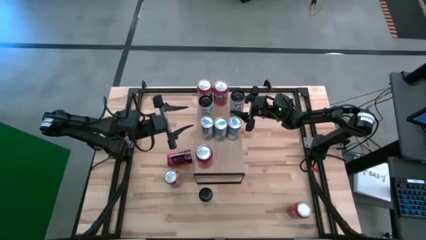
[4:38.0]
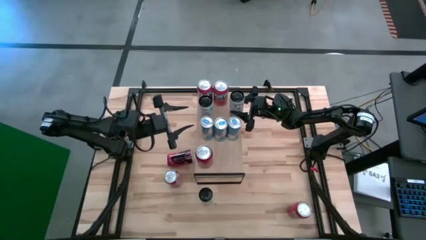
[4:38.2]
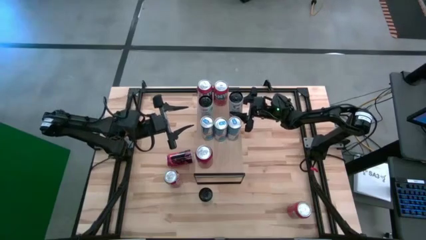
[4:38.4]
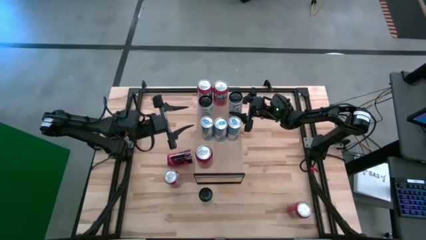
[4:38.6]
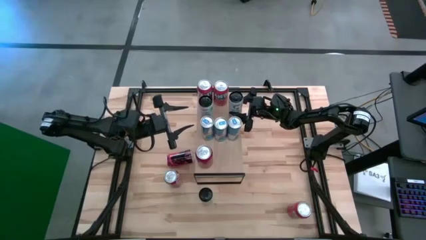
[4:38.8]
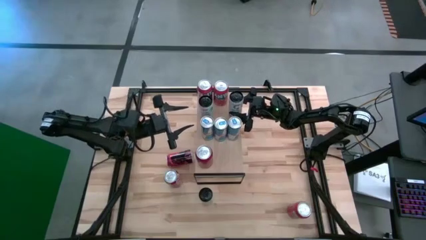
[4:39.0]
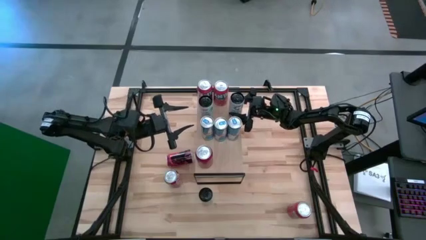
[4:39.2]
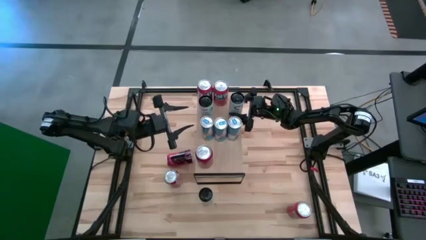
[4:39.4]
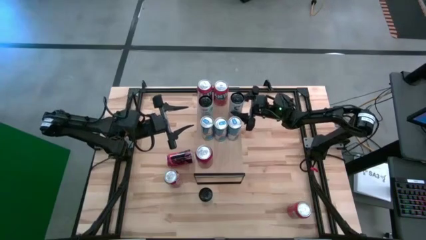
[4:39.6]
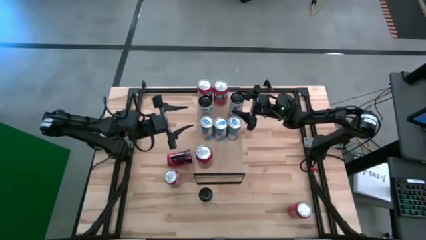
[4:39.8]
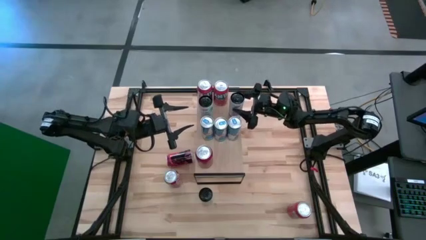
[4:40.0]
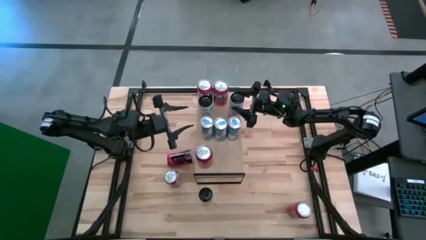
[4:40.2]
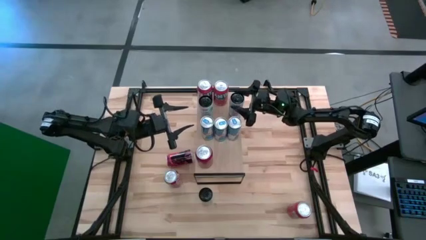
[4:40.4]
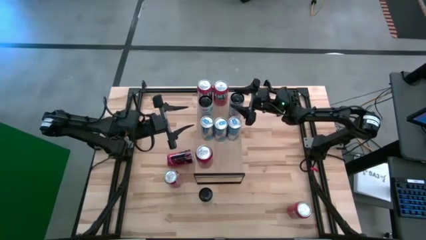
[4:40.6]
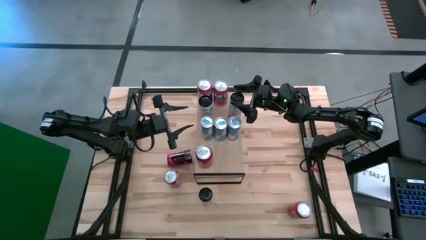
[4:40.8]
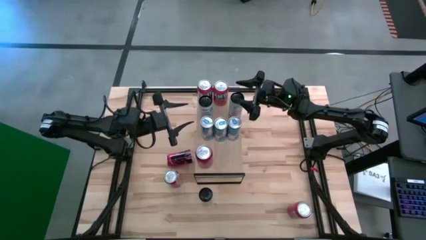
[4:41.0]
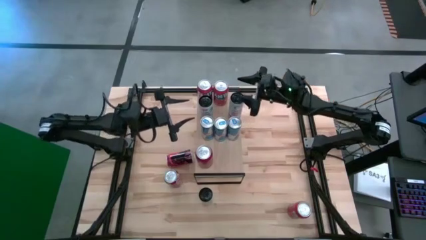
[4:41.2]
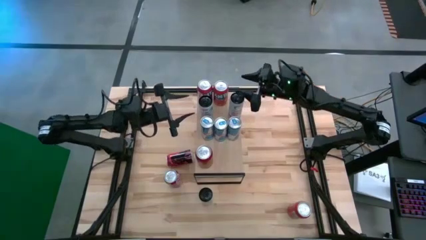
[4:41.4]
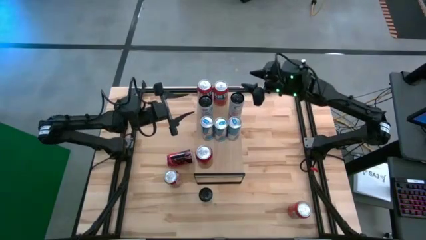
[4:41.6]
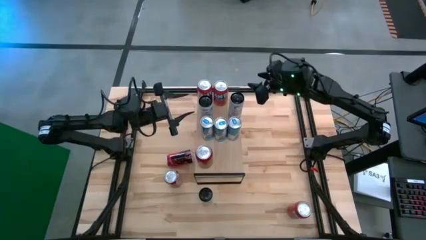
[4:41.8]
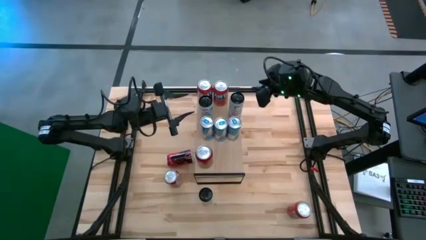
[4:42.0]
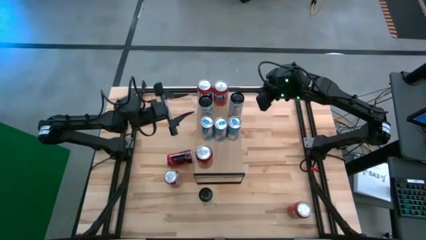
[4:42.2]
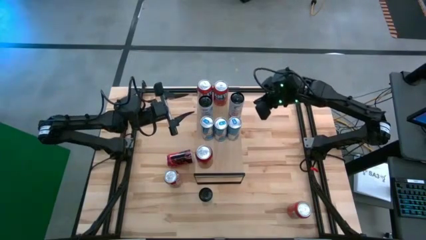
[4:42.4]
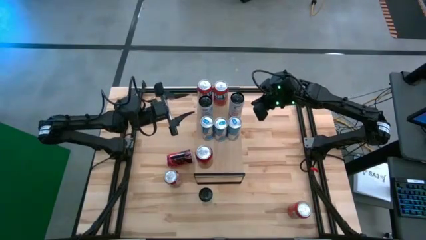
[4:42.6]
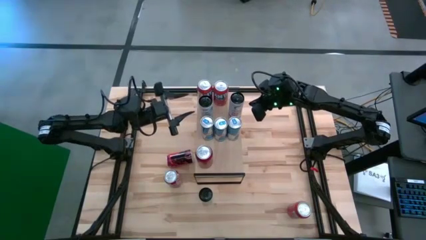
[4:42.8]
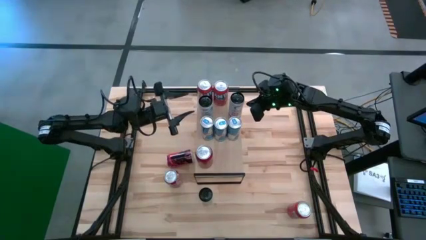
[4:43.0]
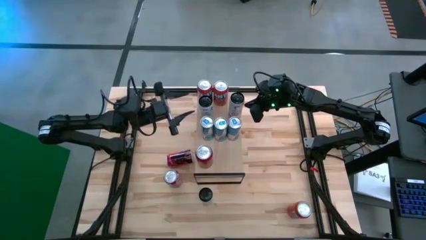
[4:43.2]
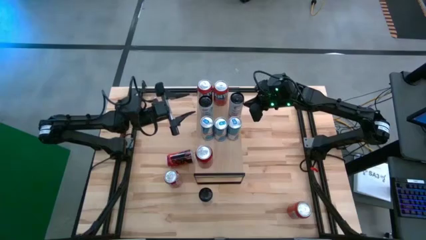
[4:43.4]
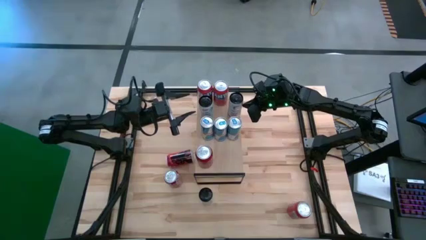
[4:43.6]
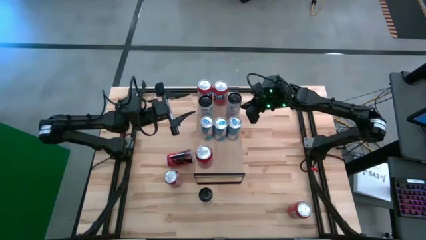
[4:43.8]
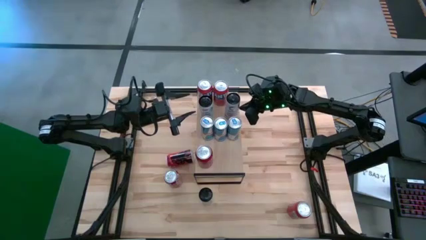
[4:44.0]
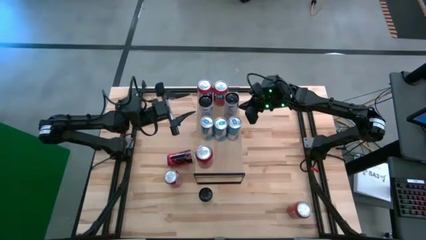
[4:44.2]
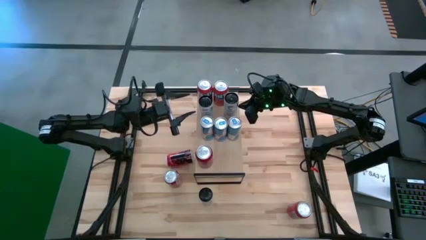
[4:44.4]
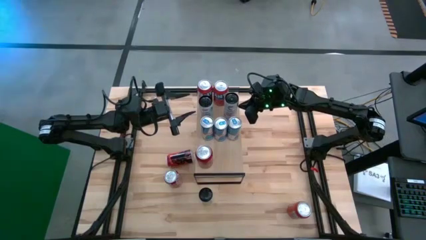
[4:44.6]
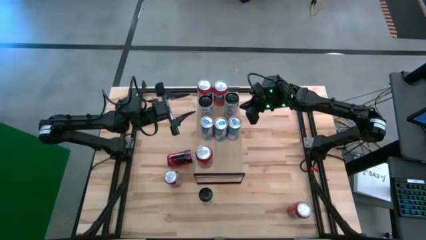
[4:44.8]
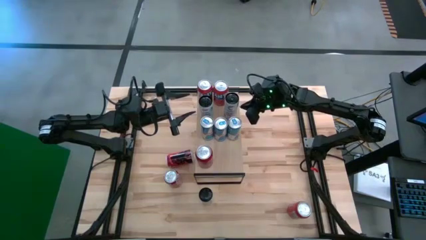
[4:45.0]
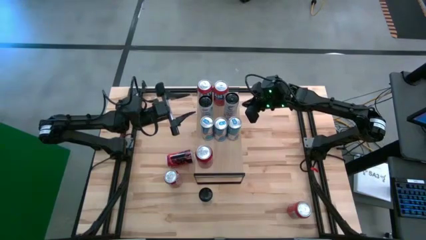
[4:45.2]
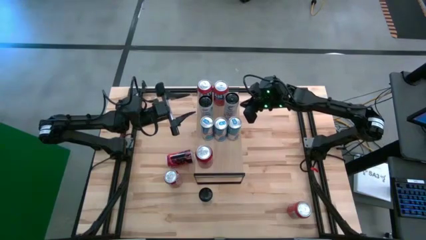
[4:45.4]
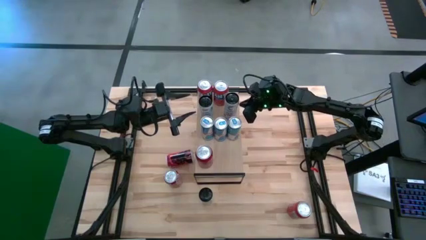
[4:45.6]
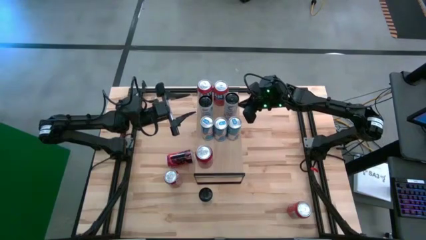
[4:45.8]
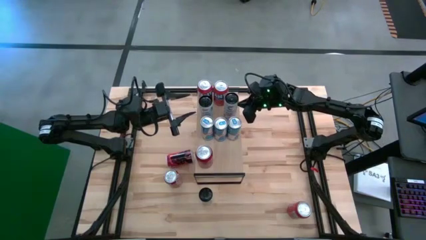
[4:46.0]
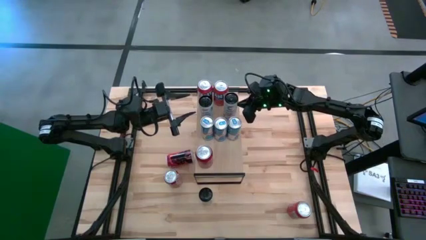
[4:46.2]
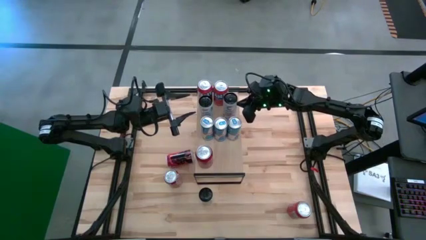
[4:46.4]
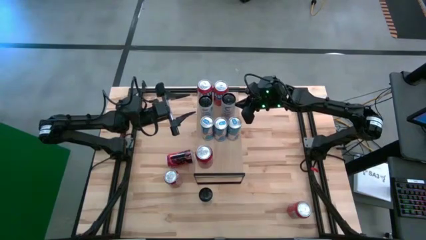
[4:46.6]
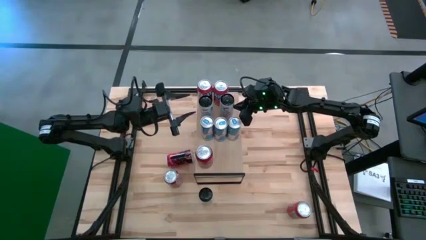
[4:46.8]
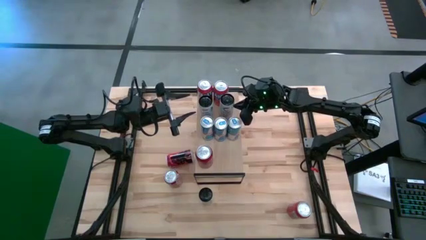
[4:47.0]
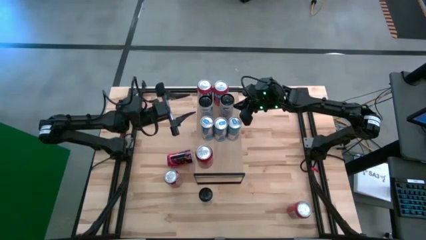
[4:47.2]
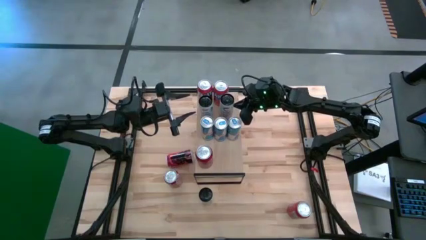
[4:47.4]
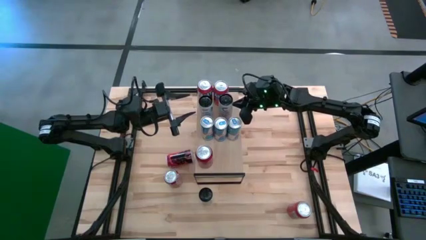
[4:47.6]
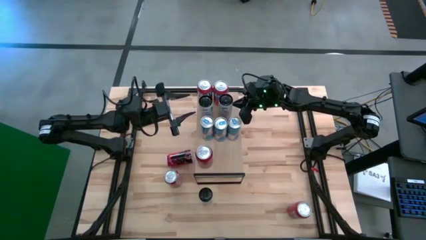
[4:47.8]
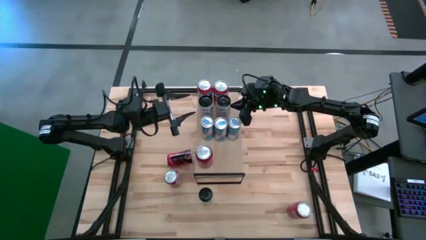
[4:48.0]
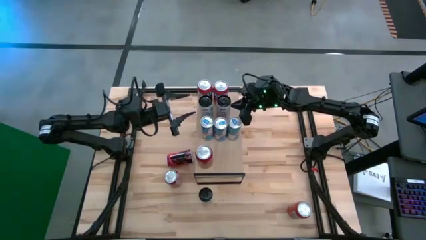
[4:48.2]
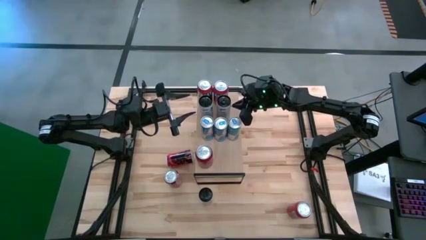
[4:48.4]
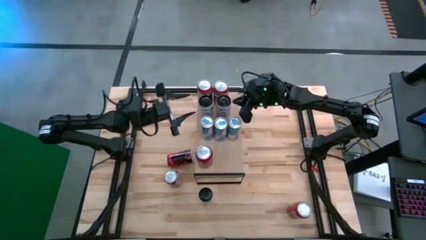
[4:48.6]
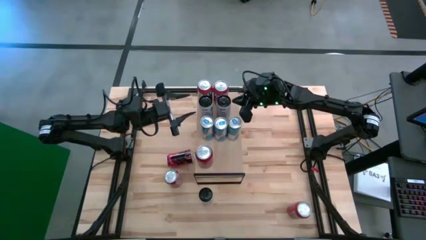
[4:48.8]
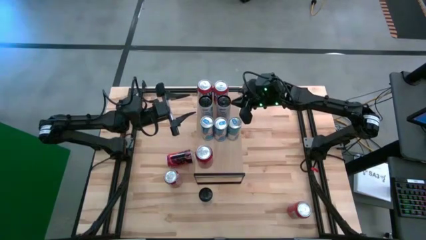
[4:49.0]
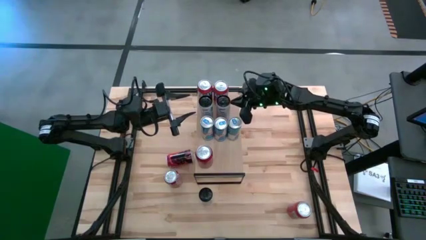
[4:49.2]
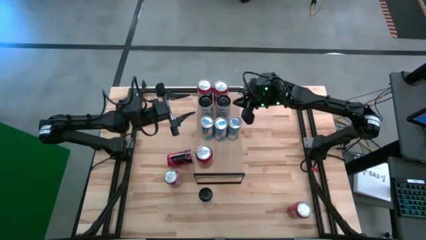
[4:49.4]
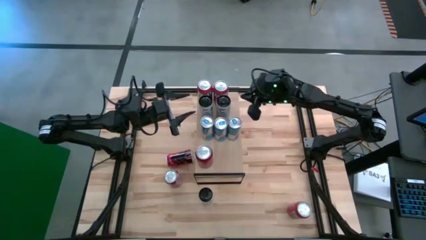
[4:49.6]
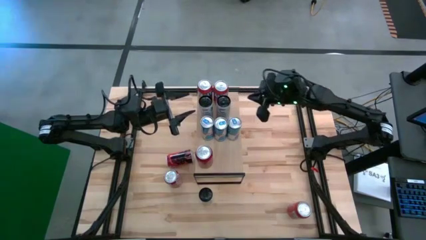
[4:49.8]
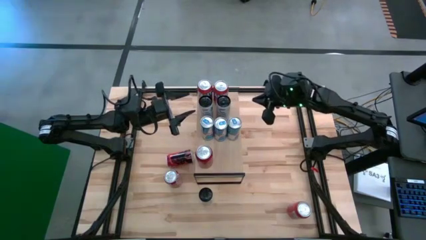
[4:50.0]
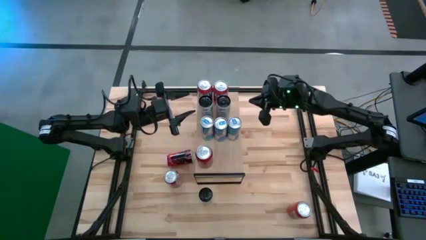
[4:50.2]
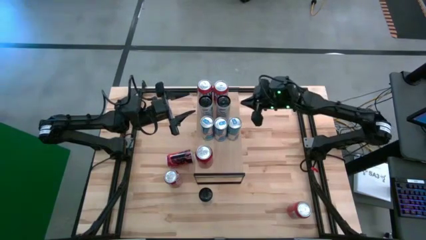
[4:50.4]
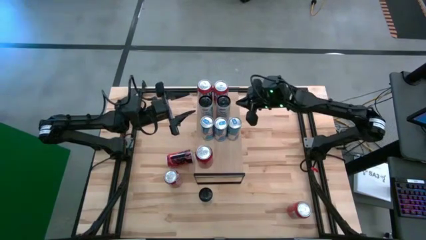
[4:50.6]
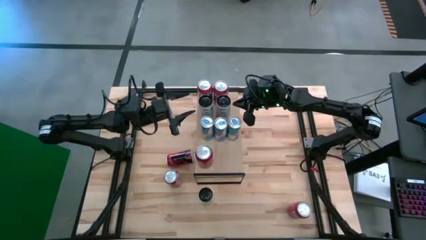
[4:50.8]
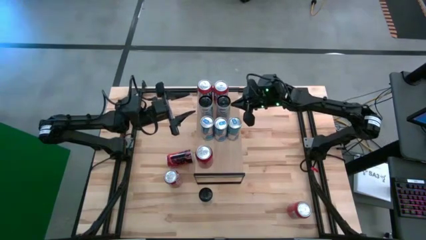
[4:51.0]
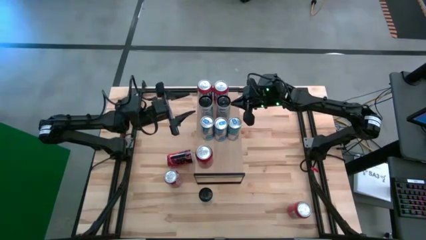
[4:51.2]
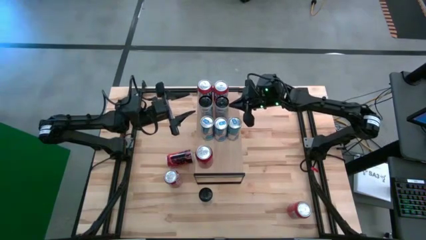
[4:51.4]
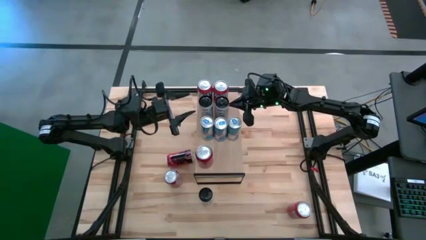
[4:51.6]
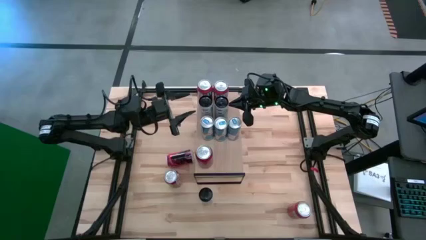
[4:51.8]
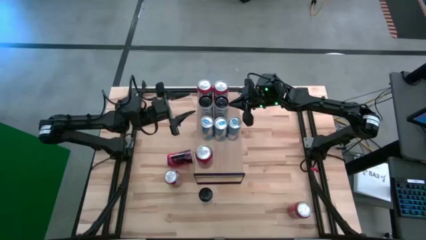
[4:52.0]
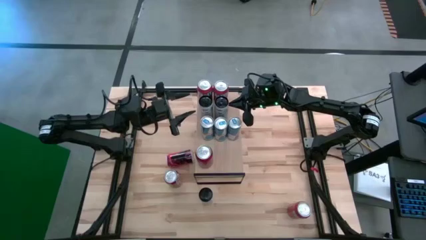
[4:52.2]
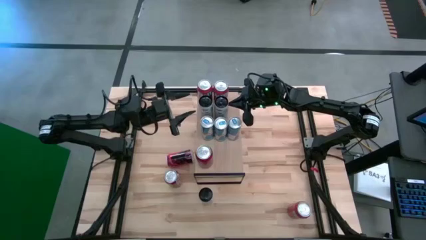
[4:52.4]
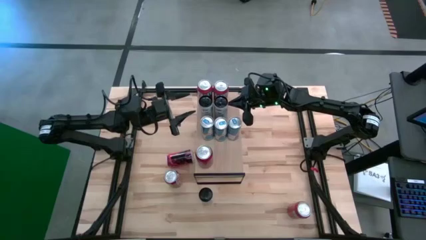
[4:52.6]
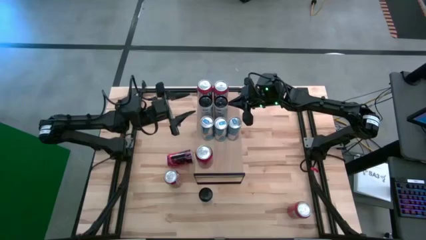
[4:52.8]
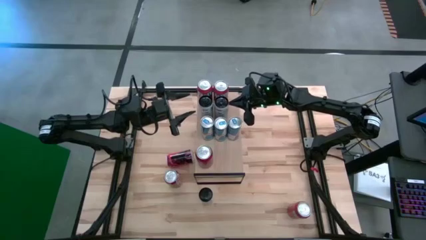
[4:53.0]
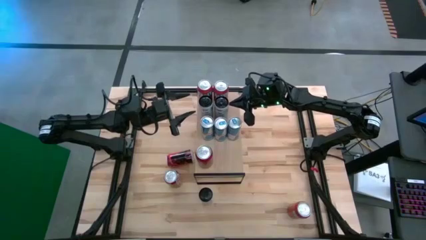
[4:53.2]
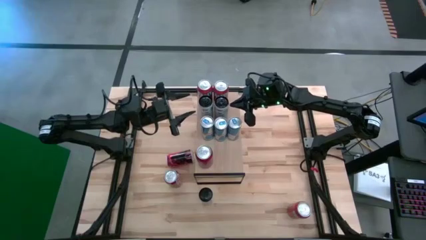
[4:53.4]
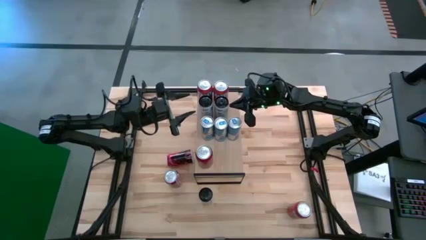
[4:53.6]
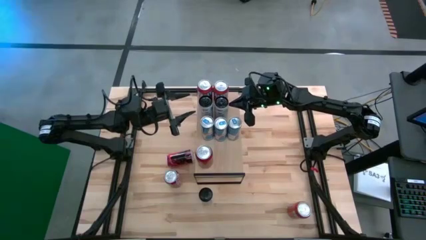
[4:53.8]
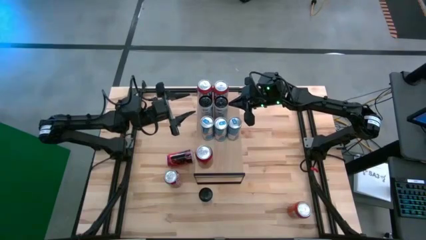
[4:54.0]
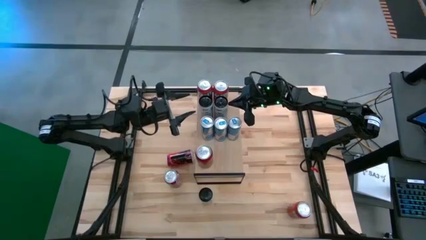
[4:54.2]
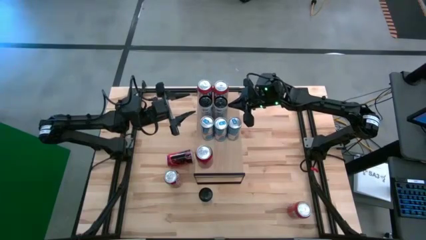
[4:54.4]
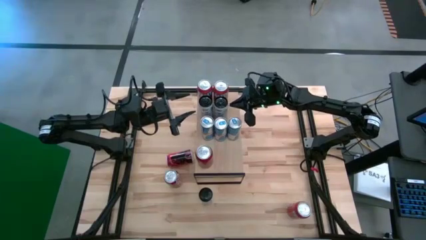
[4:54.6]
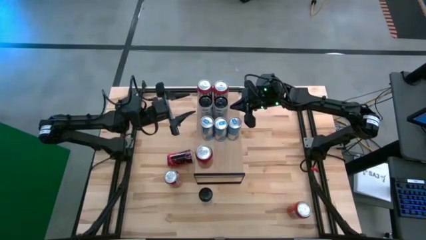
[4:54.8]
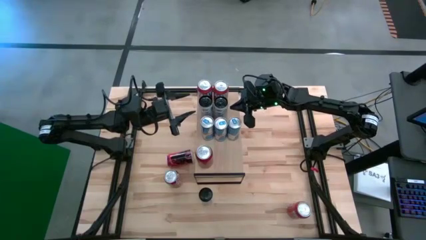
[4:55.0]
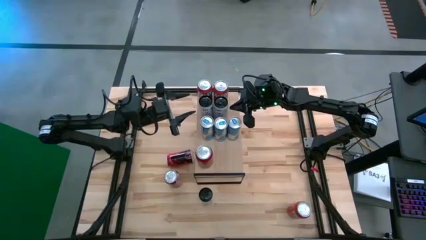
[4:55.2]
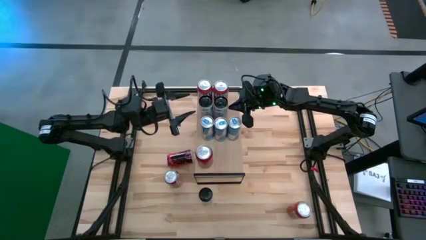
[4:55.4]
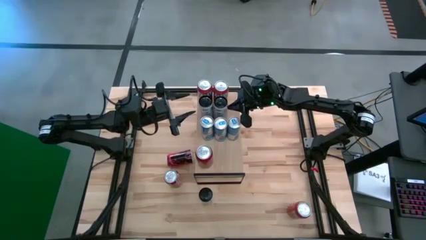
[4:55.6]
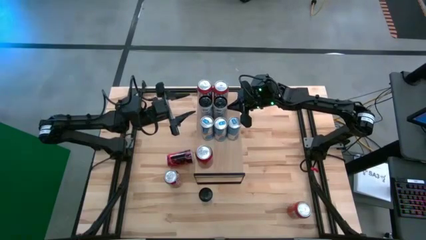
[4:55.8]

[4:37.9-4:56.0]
Task: Place canned beverage on shelf
Put the left white pink soda can on the shelf aligned with the other white pink soda can
